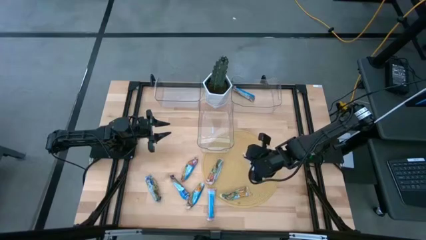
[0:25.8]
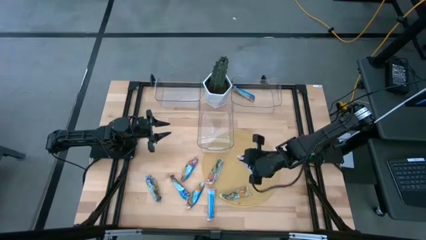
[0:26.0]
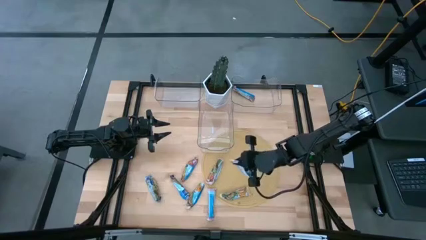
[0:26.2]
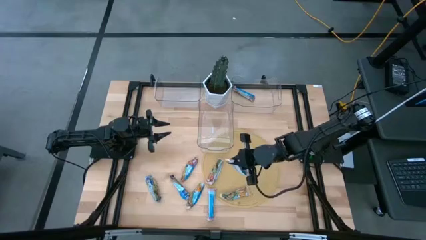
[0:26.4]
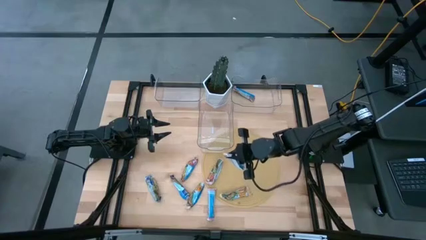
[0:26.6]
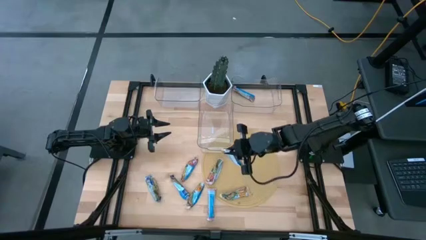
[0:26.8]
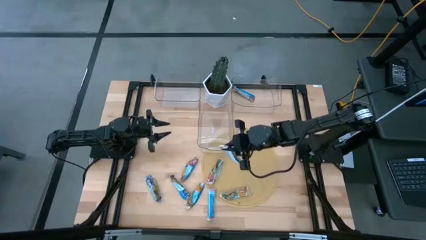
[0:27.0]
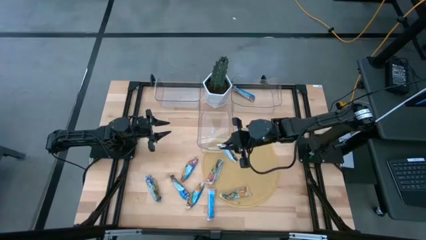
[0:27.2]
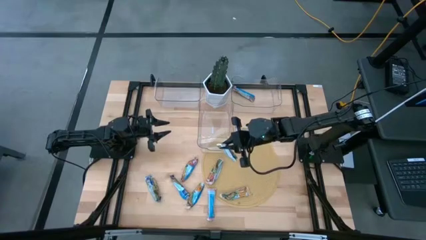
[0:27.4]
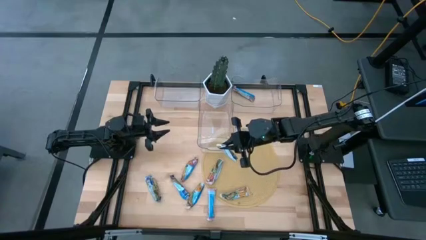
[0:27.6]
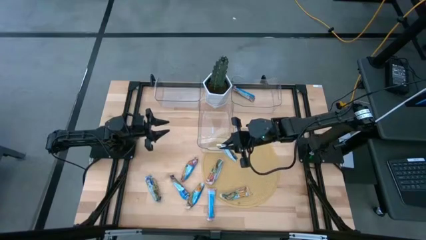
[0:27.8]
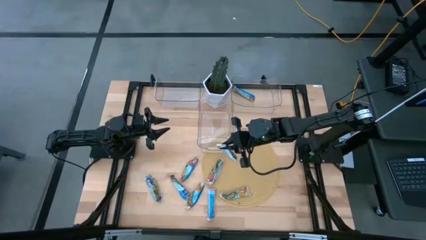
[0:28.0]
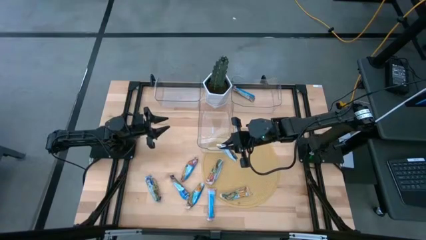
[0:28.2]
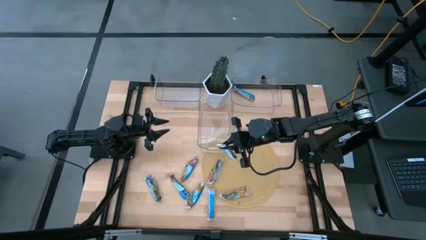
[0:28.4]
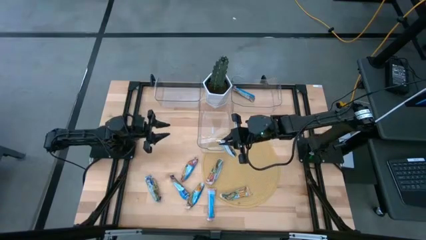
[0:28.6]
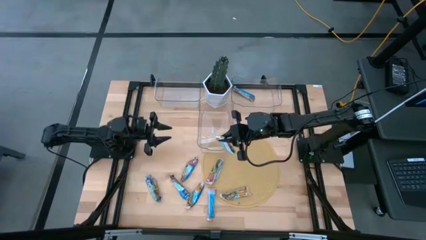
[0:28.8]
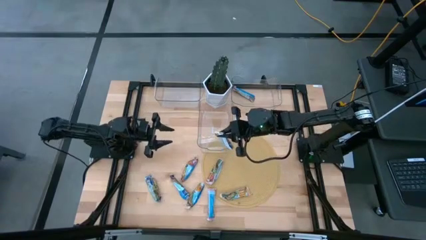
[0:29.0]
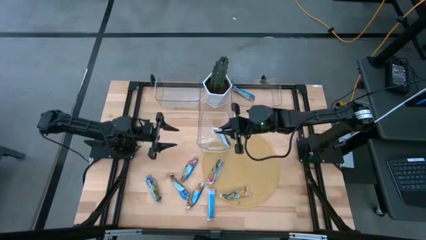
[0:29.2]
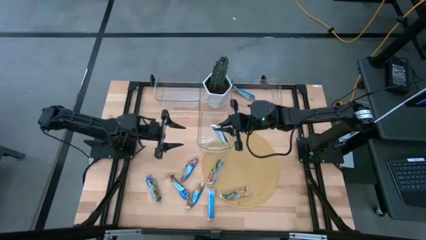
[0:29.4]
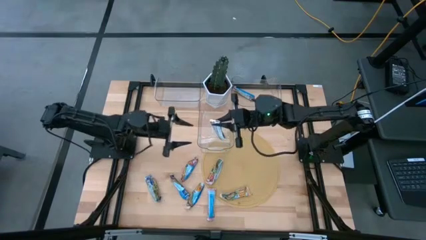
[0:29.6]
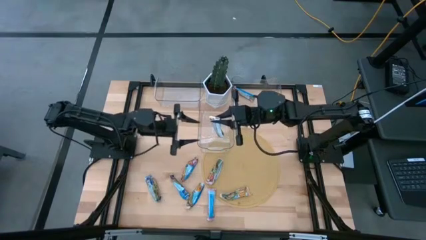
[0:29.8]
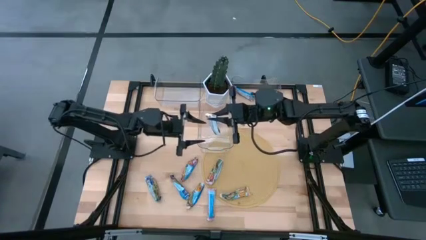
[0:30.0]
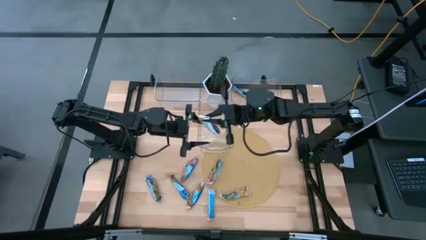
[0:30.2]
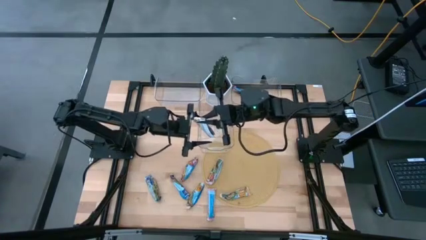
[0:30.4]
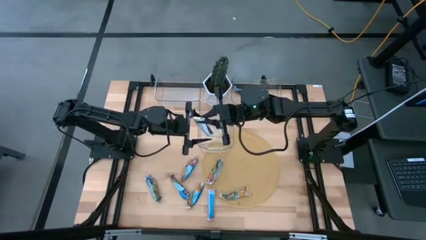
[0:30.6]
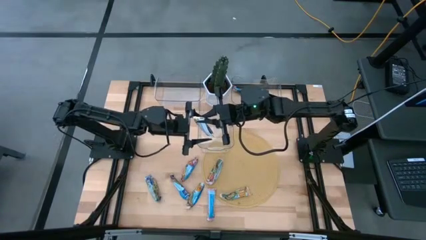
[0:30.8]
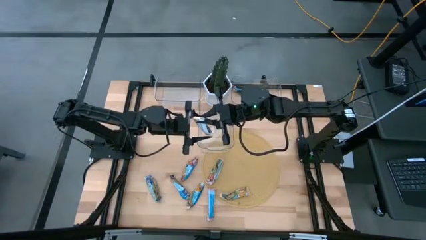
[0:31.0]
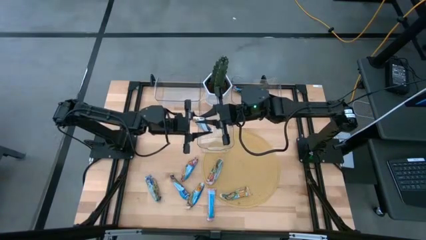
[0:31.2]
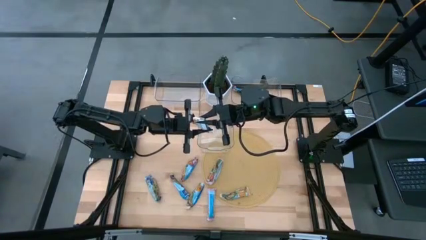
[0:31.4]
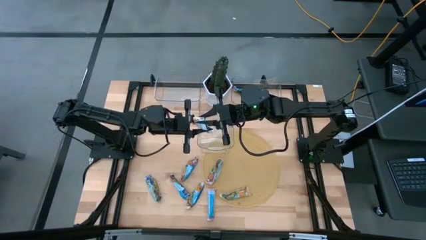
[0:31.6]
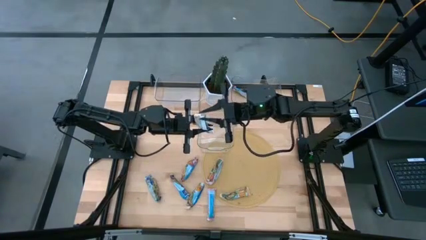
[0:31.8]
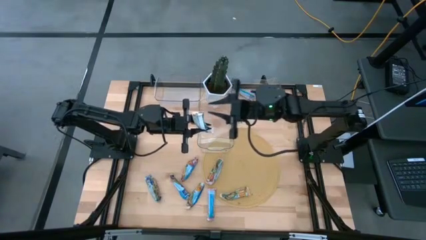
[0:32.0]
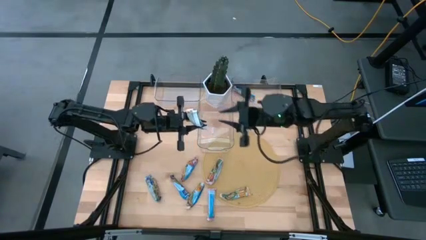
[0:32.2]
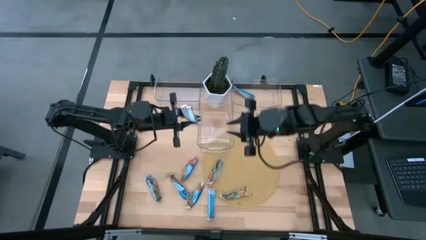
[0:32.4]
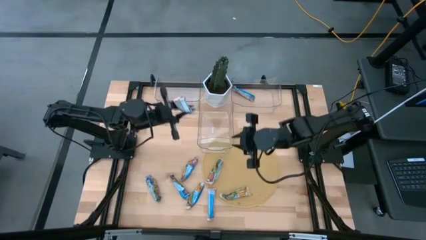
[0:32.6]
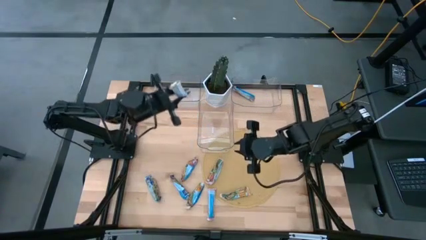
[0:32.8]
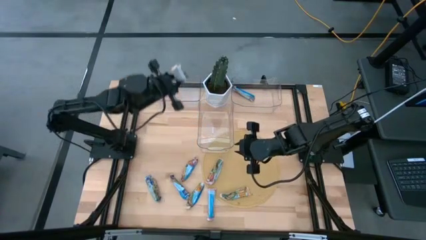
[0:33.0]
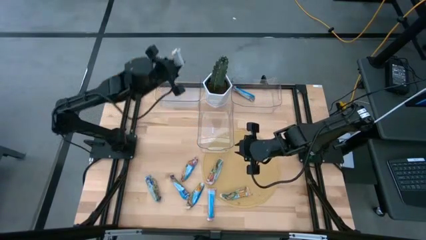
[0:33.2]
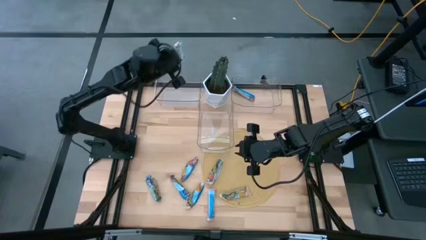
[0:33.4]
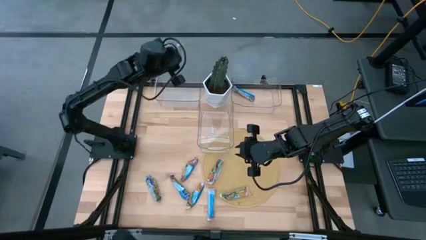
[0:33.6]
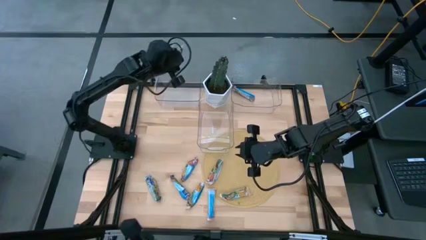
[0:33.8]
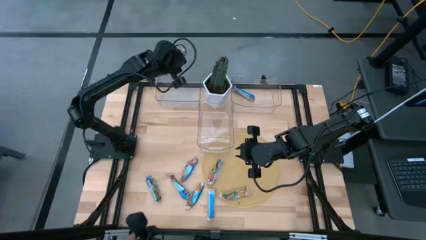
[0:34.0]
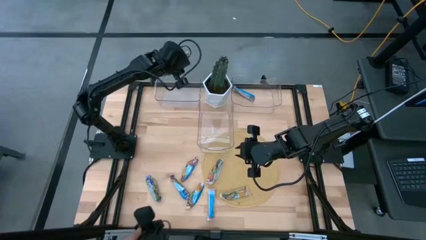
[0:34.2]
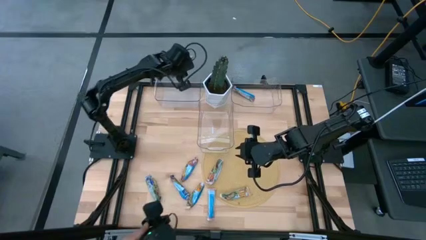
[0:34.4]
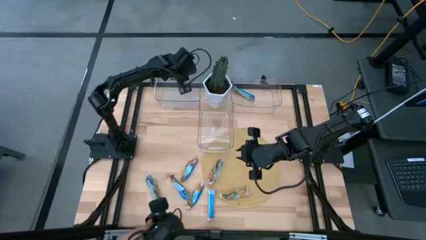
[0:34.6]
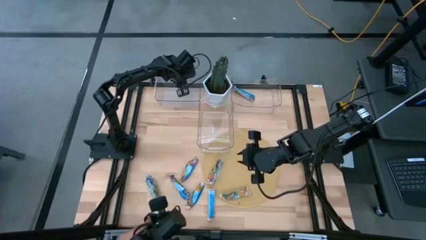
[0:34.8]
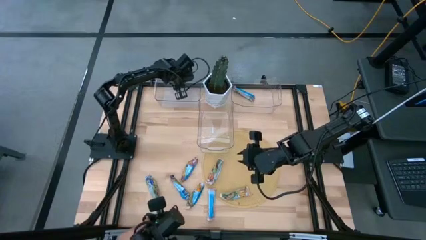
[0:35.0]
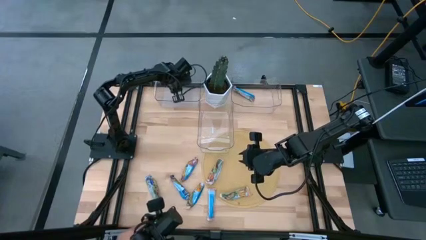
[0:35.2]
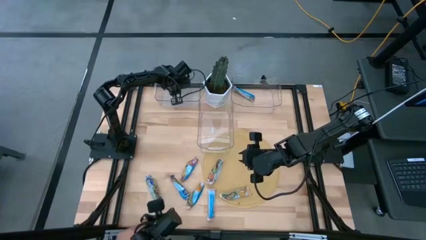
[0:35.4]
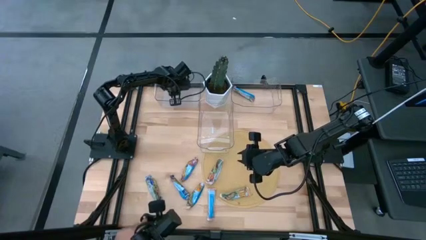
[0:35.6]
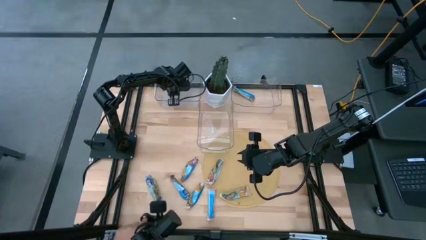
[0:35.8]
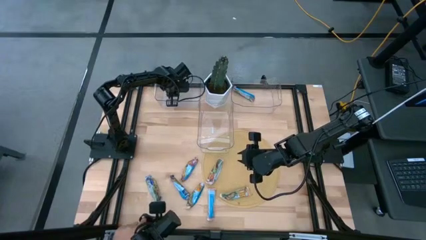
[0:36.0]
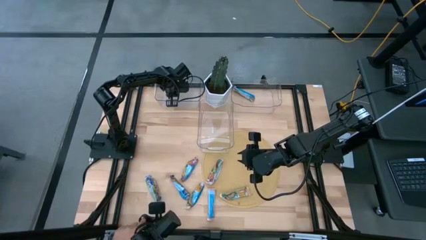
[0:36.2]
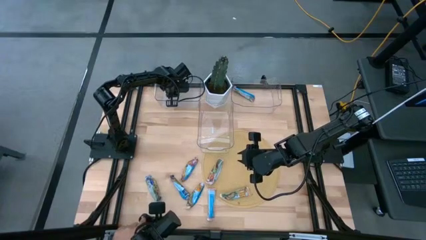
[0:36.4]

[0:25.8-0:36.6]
Task: Pick and place Granola Bars by type
Put the yellow green granola bar into the left transparent bin

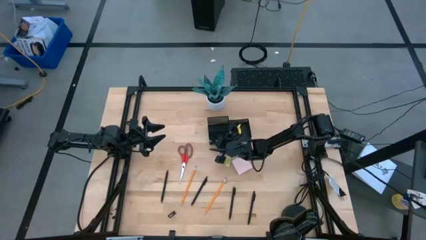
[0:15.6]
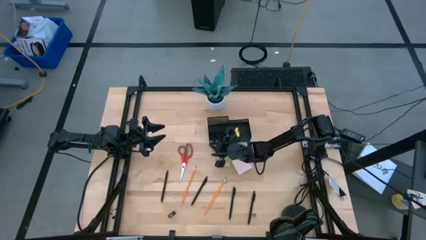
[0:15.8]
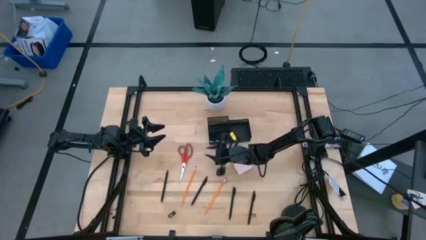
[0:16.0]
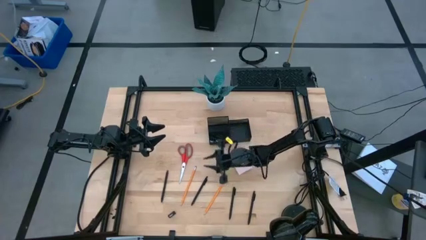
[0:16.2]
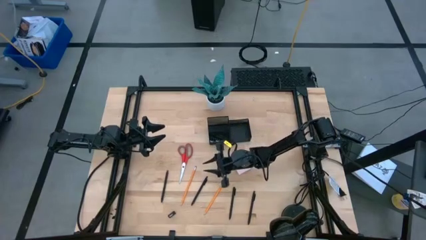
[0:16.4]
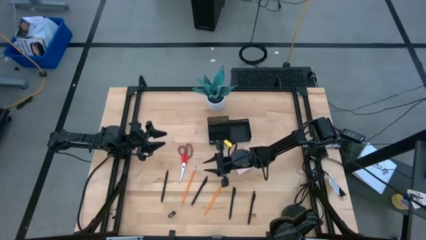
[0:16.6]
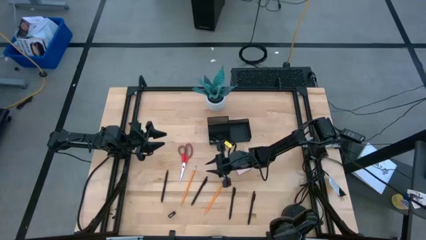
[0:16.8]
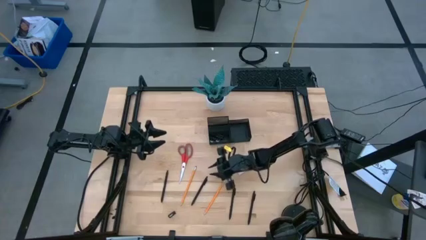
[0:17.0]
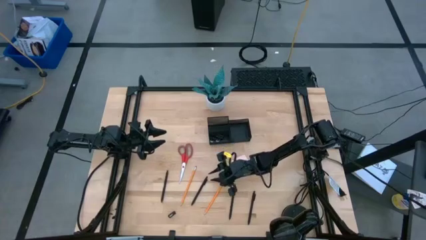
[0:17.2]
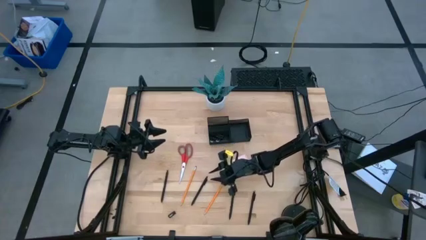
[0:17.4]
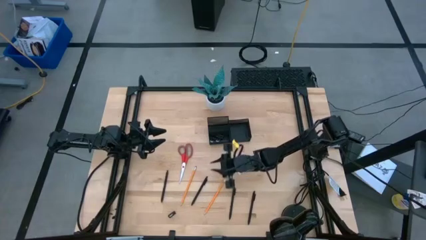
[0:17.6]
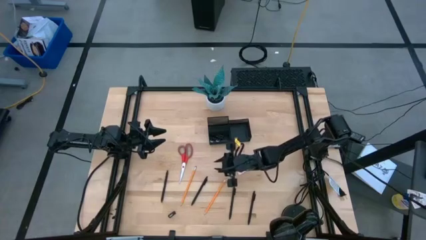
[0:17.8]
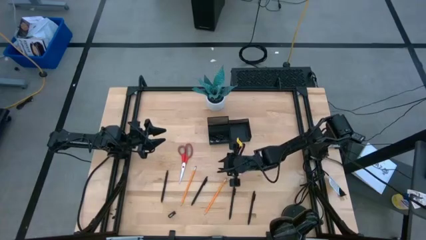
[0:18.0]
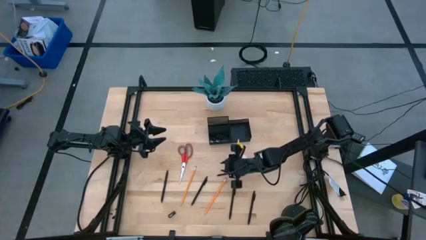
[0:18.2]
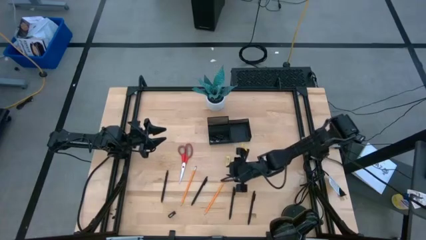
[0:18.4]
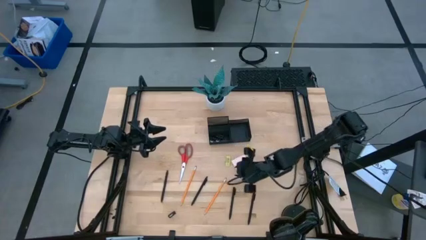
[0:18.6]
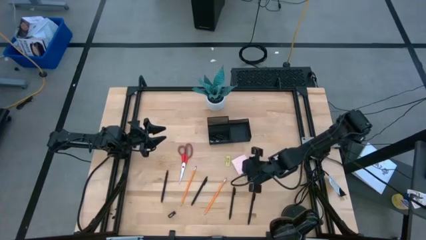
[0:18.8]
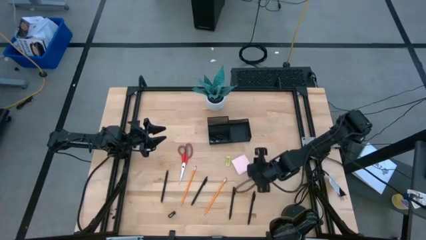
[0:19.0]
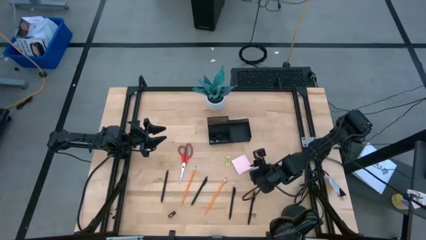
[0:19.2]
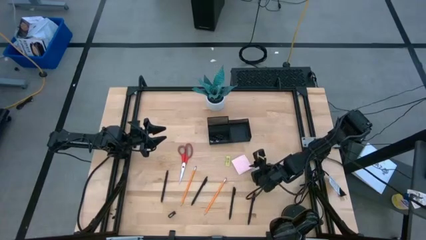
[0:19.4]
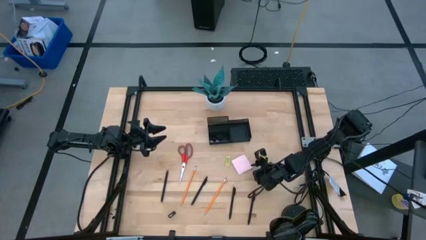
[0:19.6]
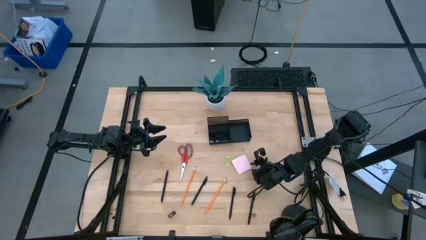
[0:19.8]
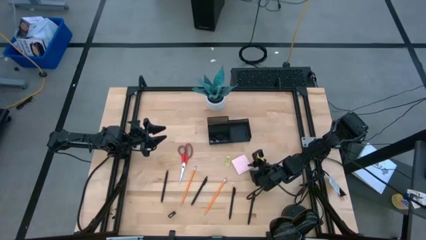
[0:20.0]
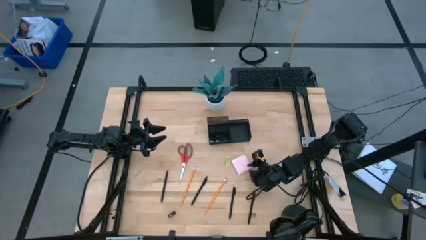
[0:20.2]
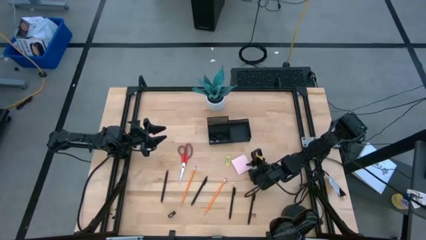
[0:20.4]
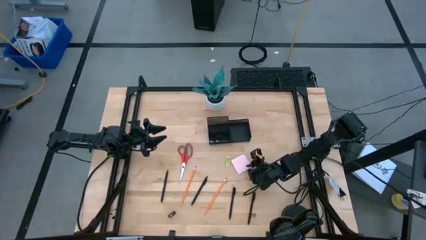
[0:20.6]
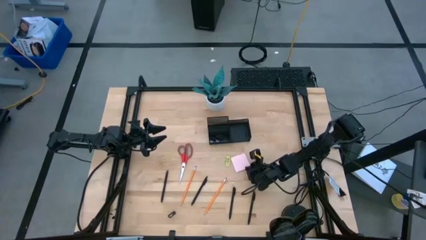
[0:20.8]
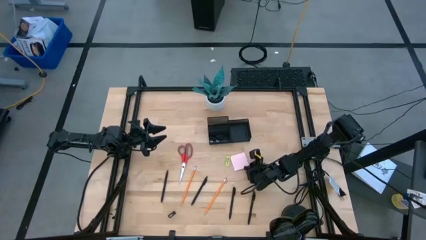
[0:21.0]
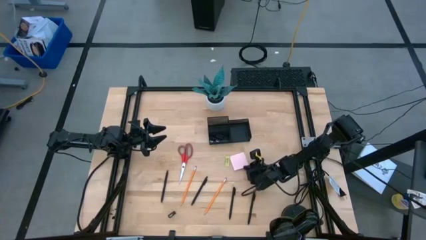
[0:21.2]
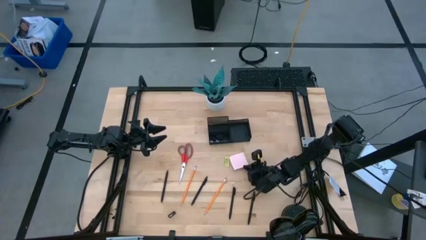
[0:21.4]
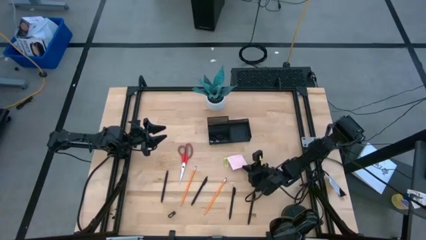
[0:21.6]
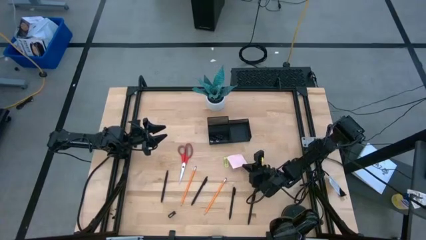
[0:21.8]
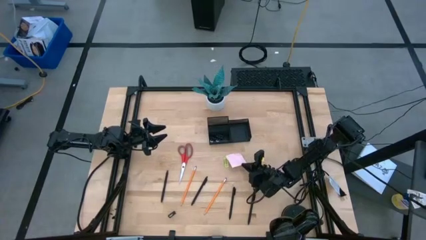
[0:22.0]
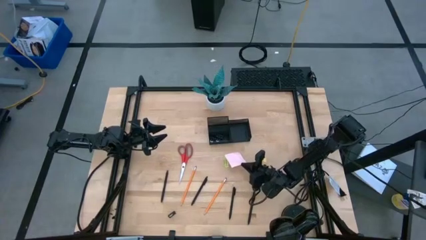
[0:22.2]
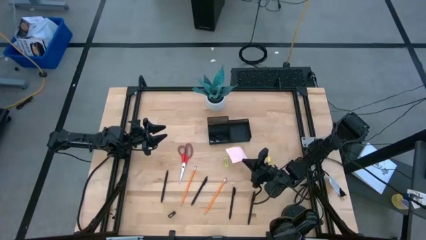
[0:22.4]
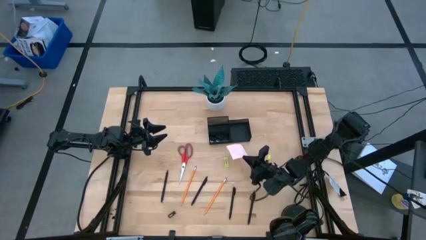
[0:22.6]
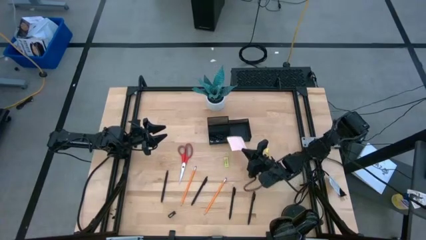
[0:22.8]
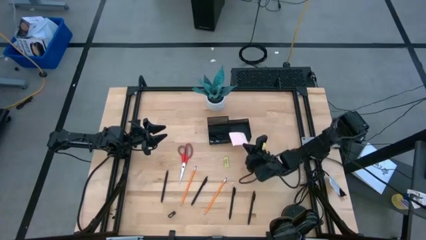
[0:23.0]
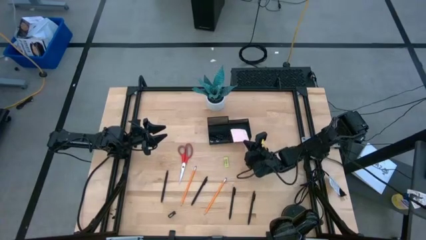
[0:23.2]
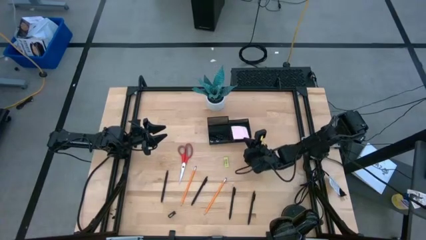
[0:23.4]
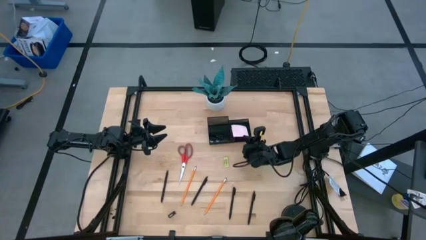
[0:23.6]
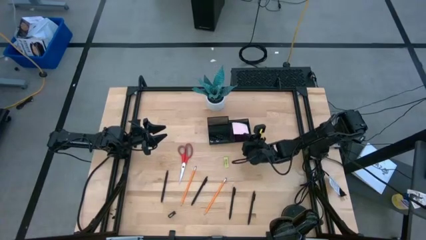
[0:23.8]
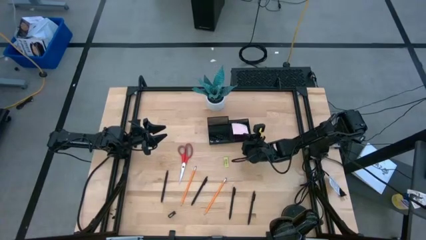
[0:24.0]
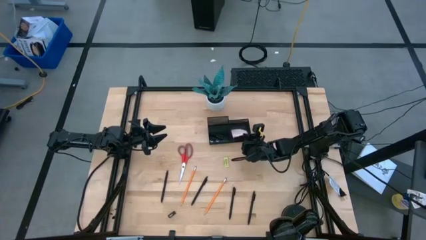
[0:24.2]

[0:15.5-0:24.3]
Task: Pick and place office supplies into organizer
Put the pink sticky notes into the black desk organizer
